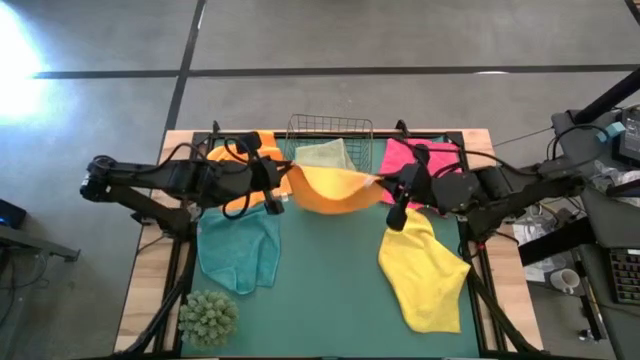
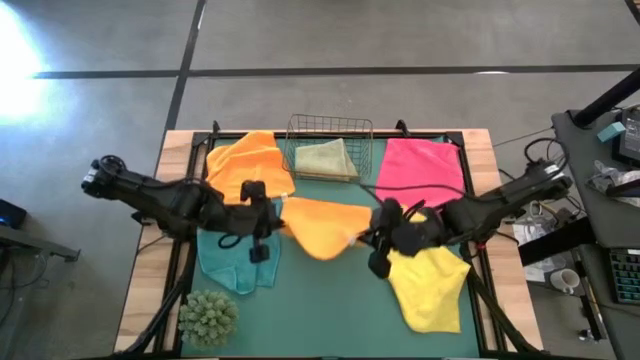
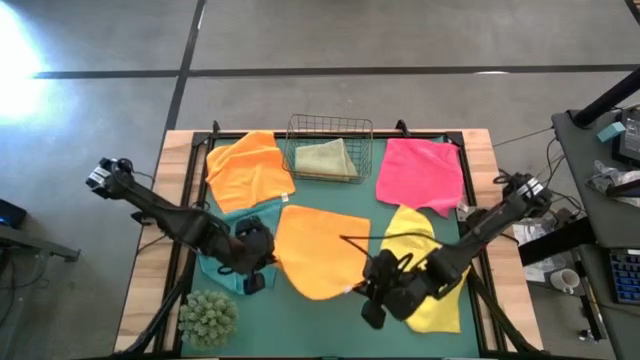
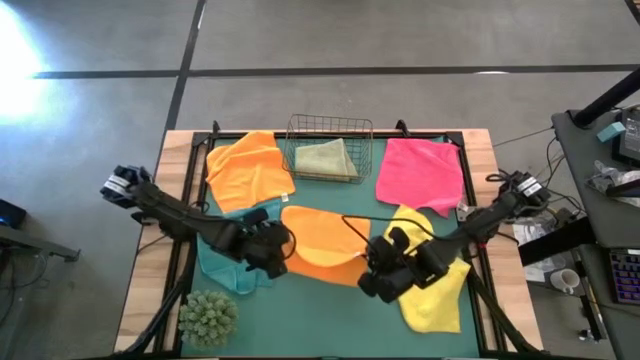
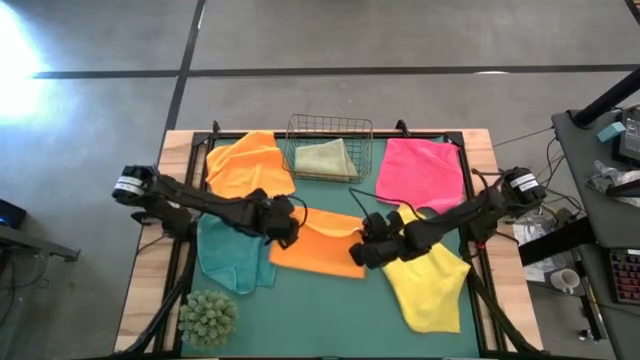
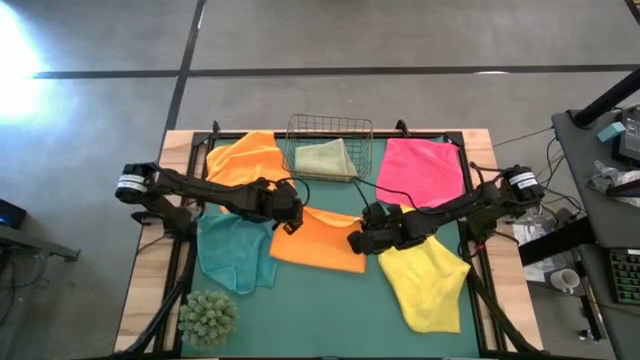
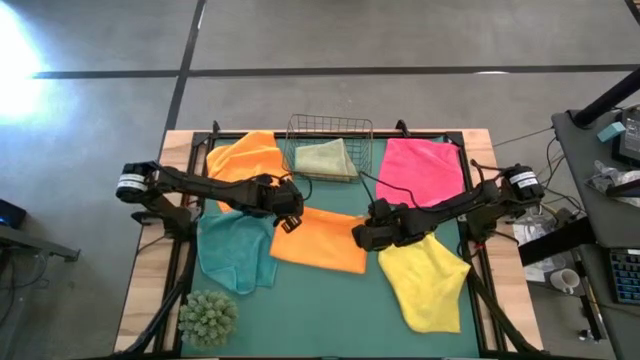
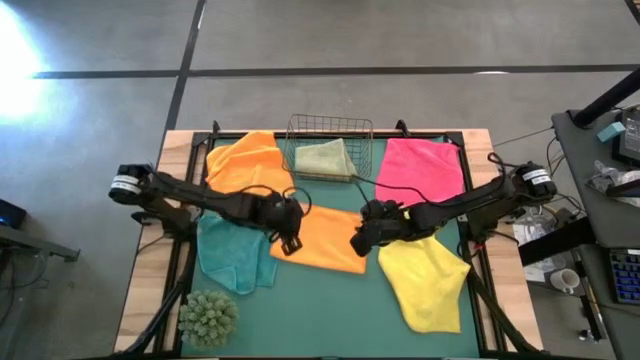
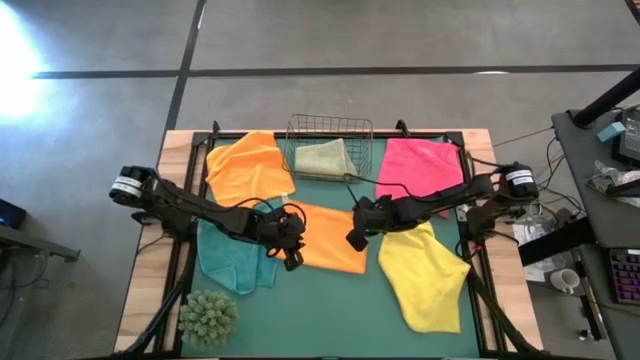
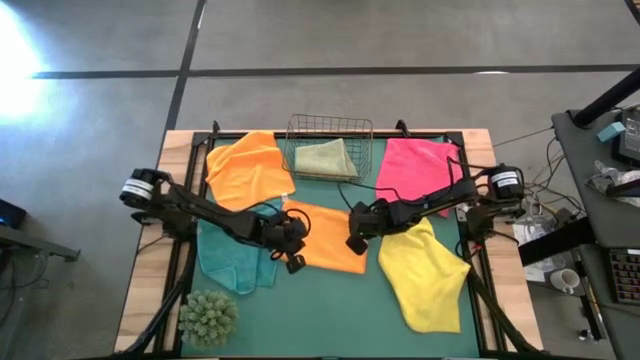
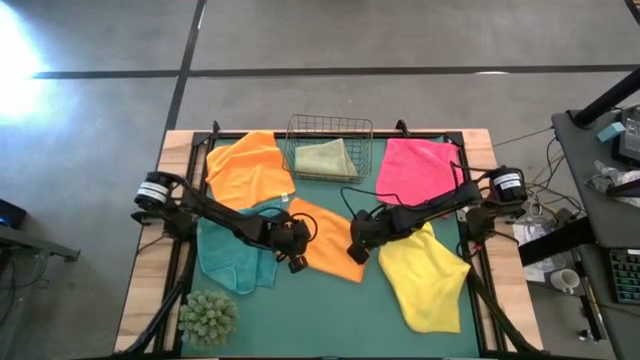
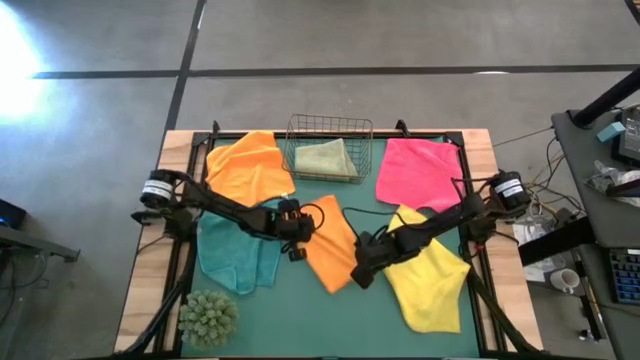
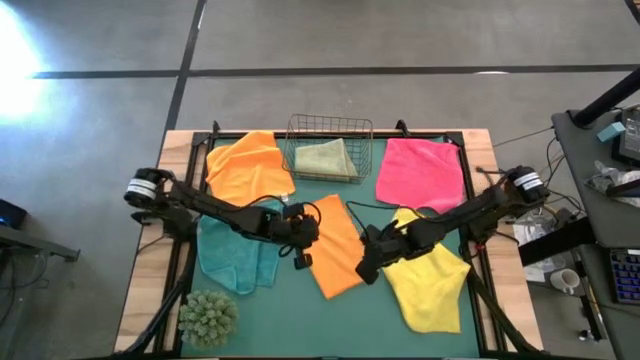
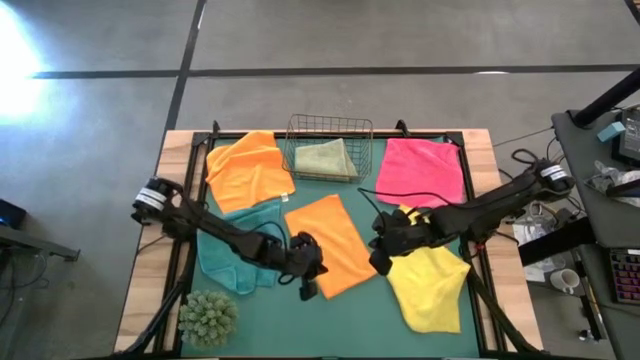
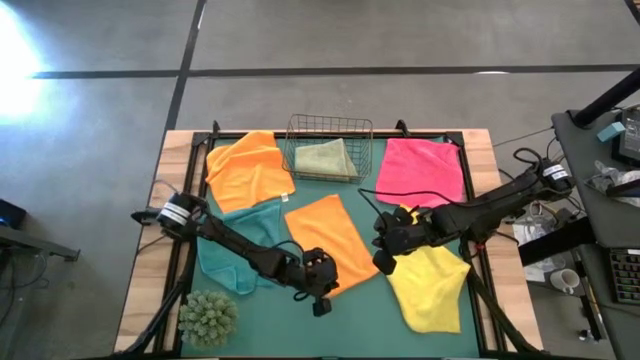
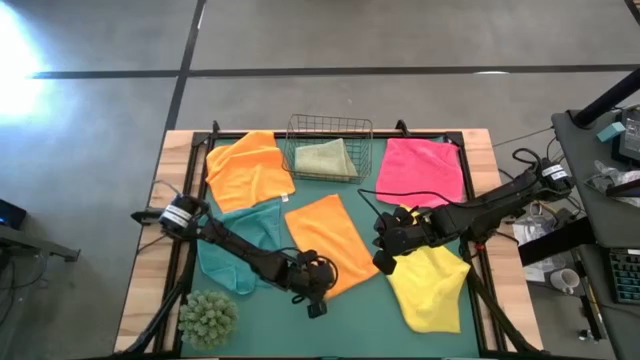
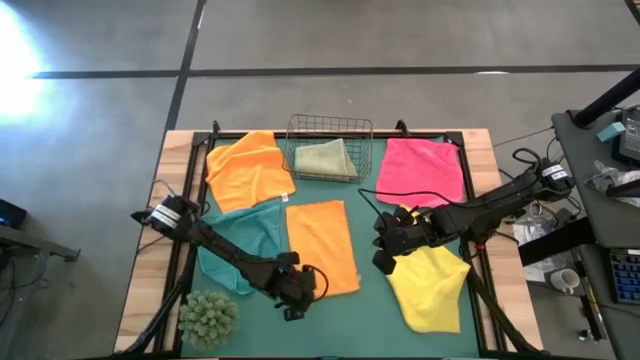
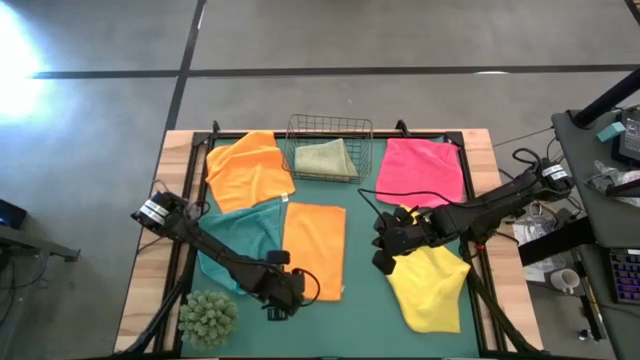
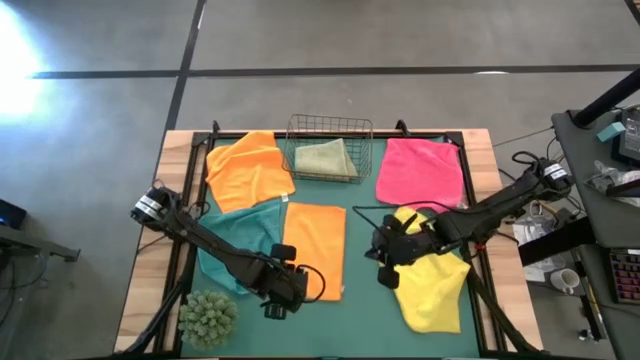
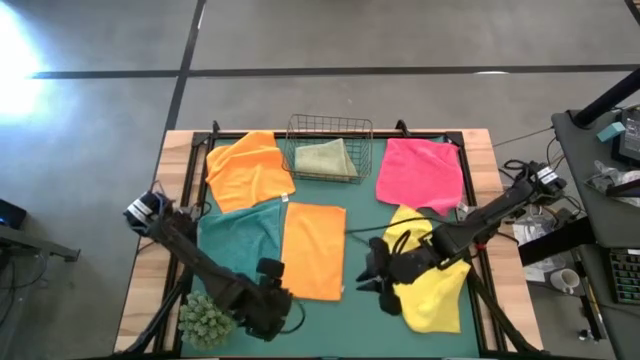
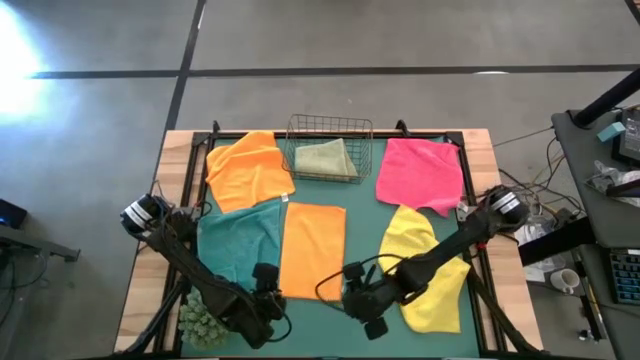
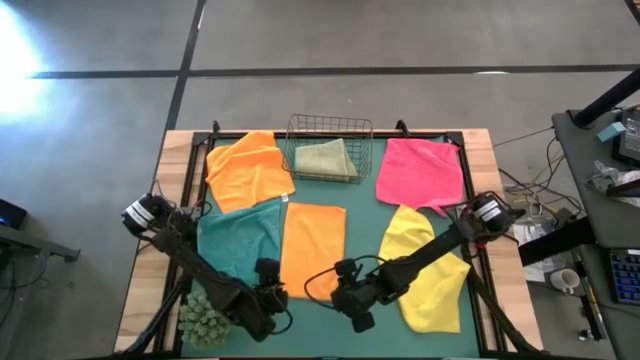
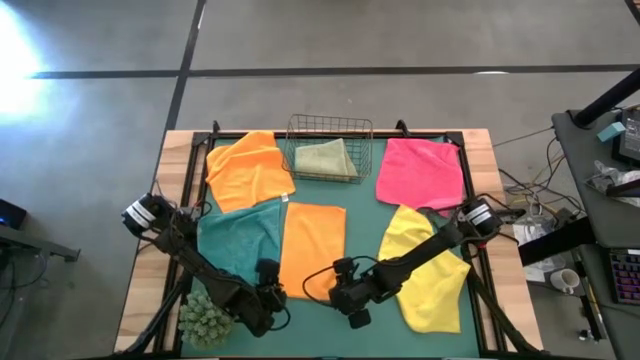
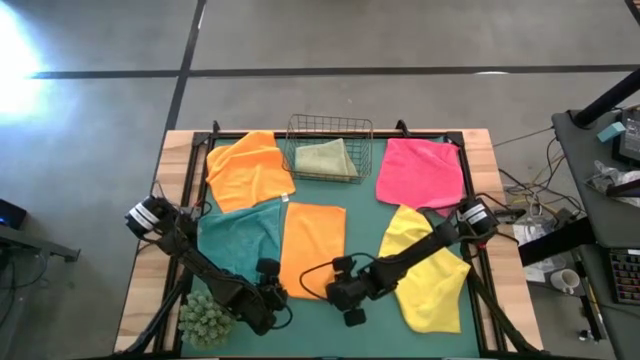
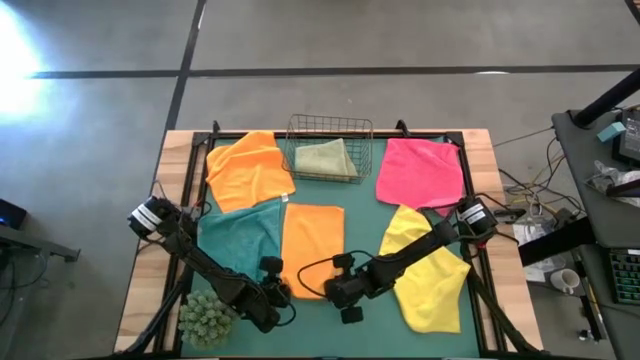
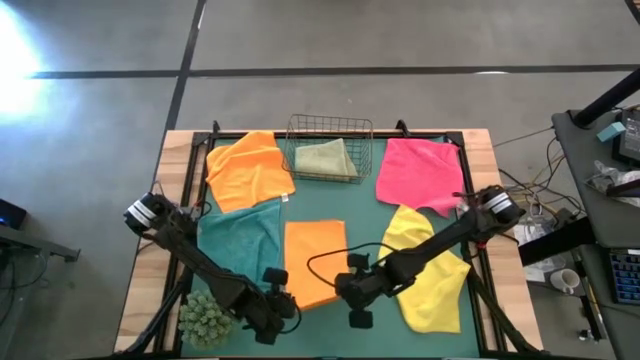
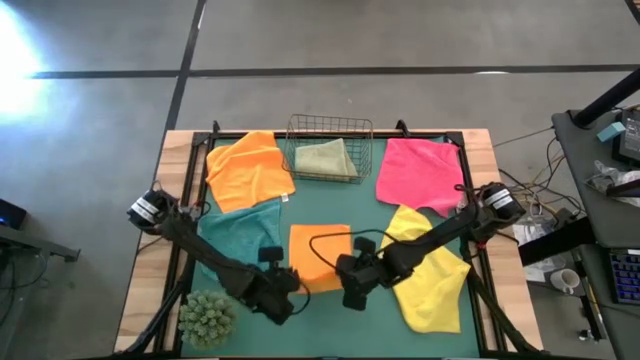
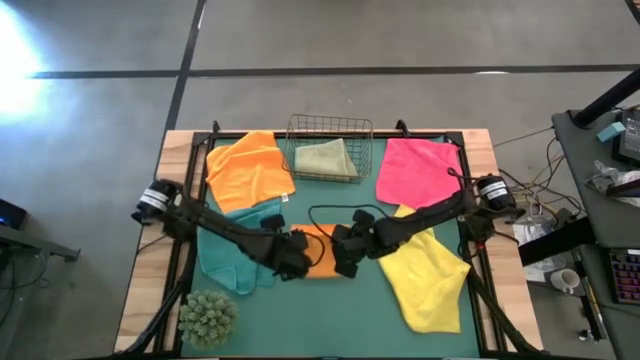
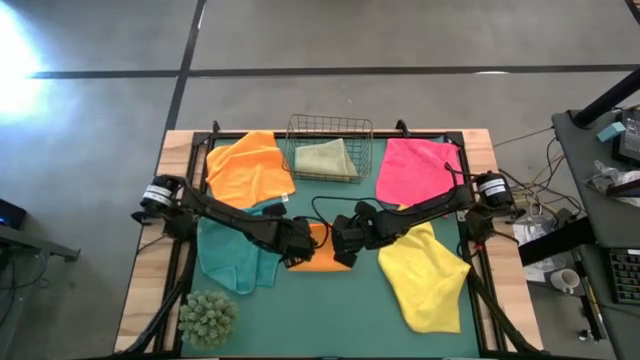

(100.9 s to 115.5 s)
Task: Fold microfiber towels
Fold the orange microfiber cloth

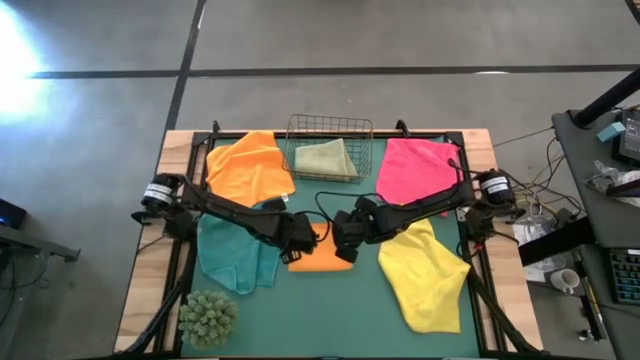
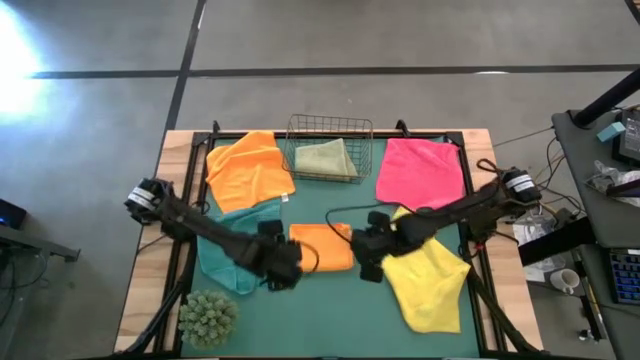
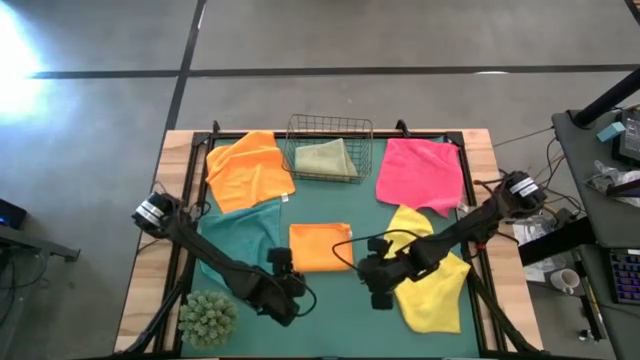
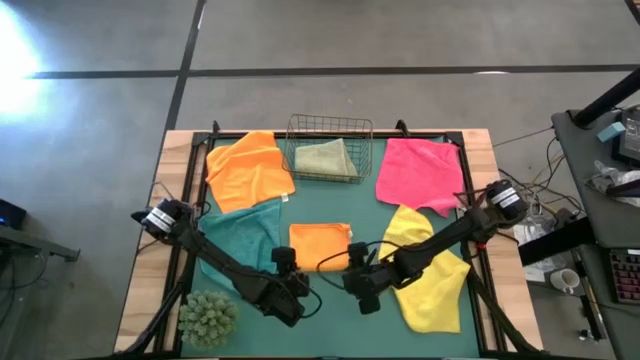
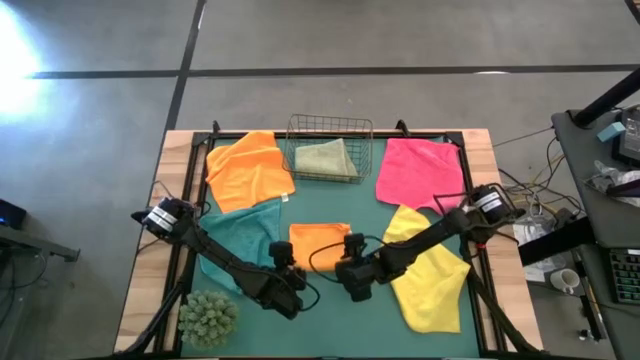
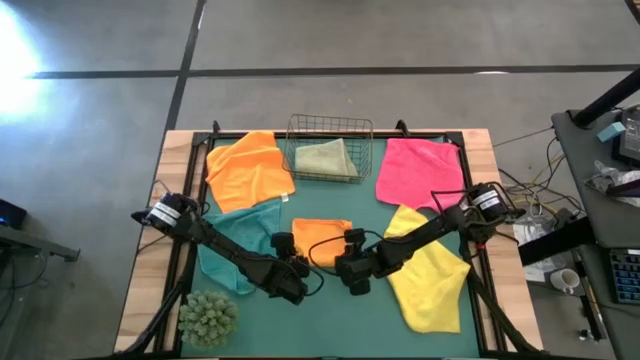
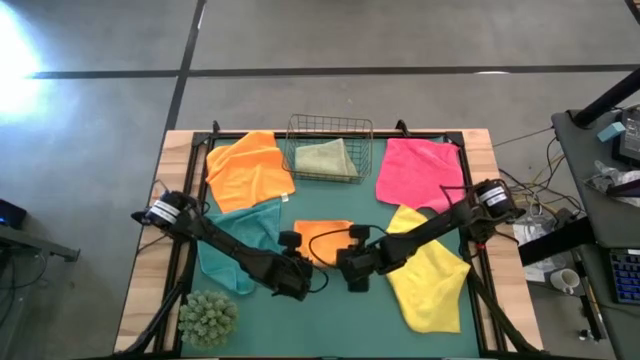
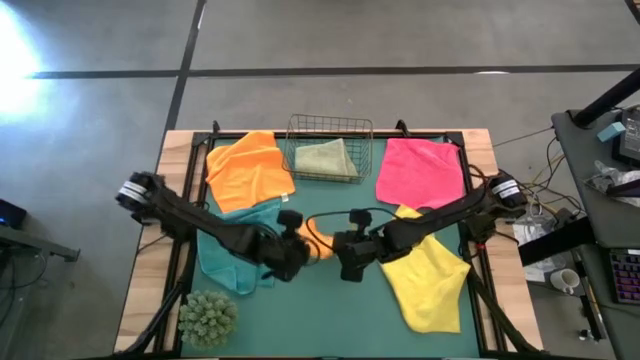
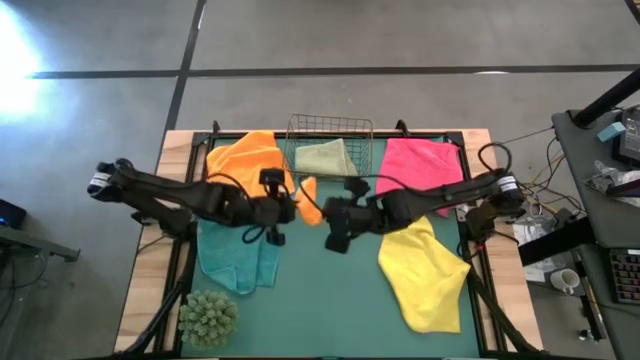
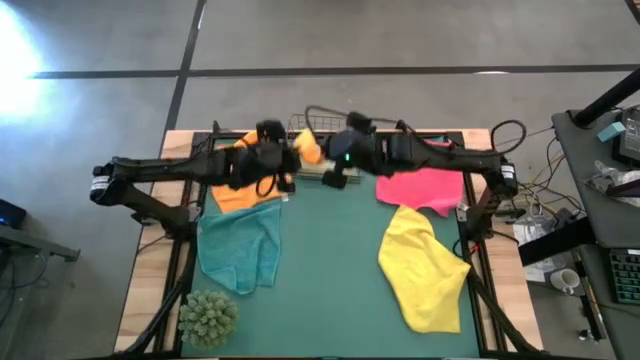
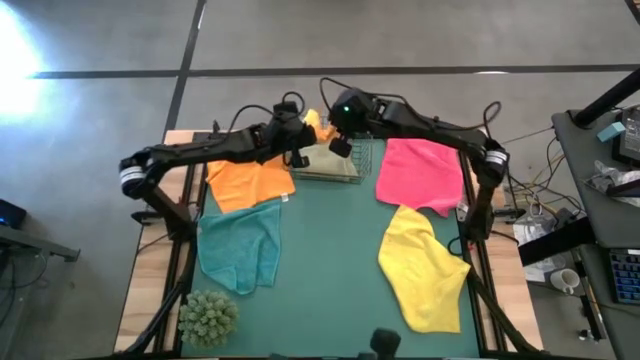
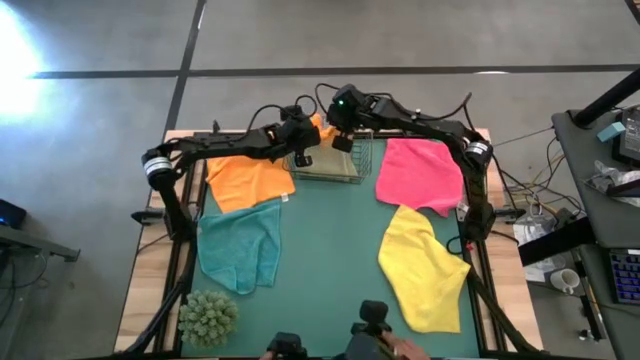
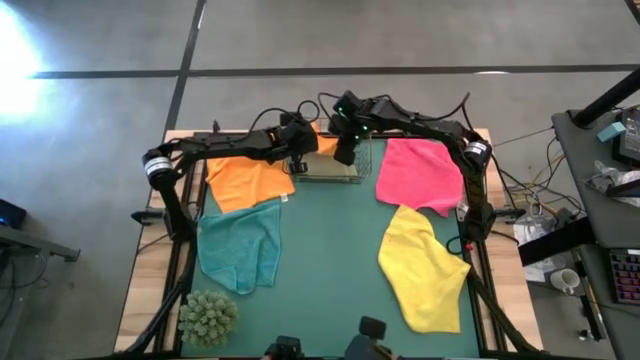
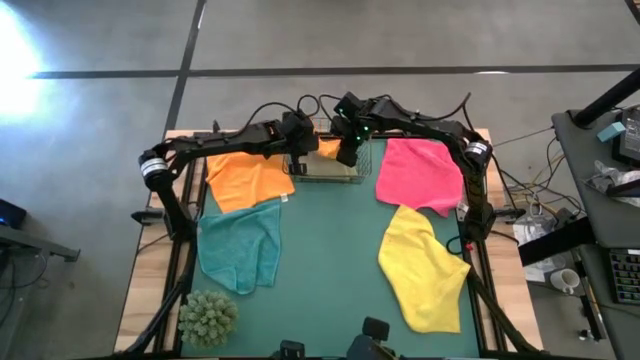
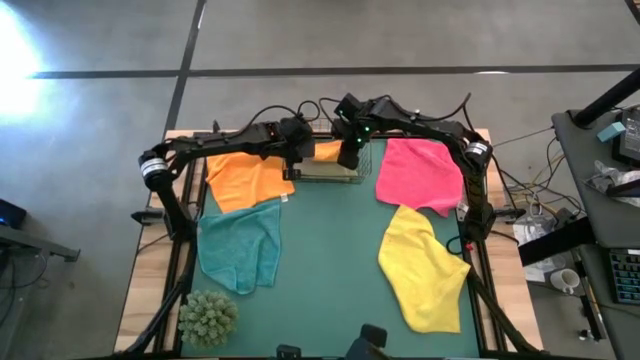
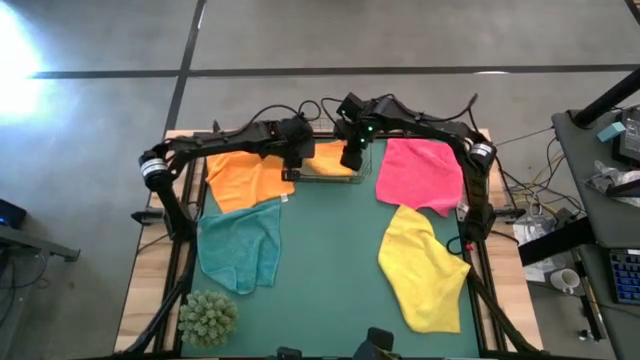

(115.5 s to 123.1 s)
Put the orange microfiber cloth into the wire basket
